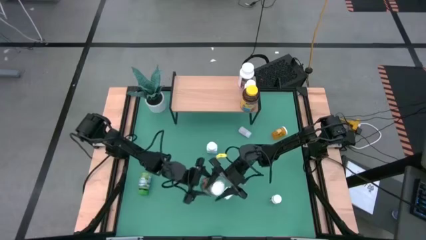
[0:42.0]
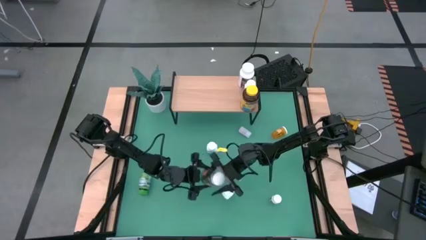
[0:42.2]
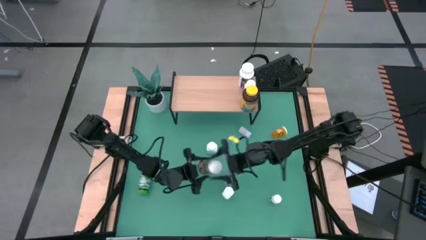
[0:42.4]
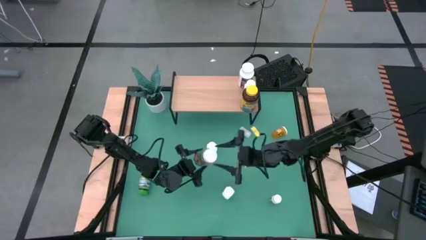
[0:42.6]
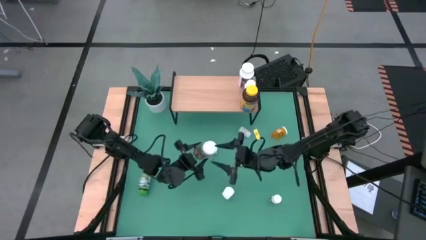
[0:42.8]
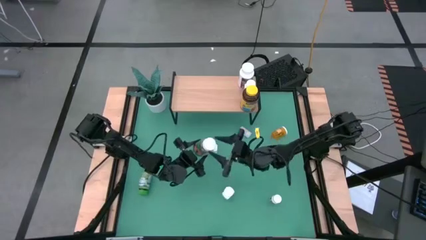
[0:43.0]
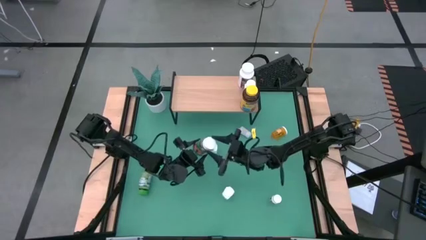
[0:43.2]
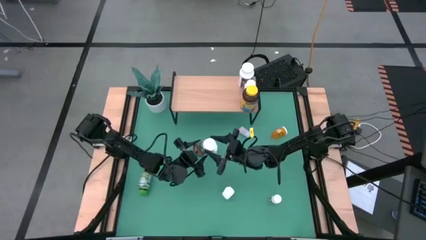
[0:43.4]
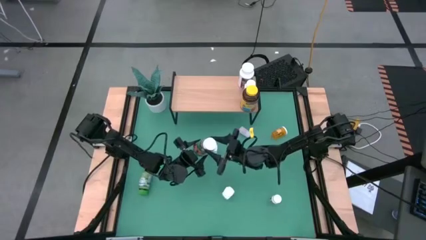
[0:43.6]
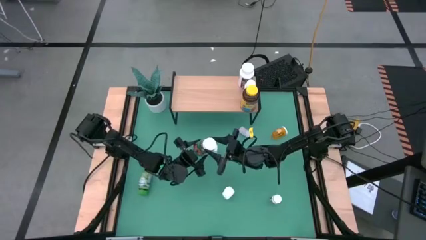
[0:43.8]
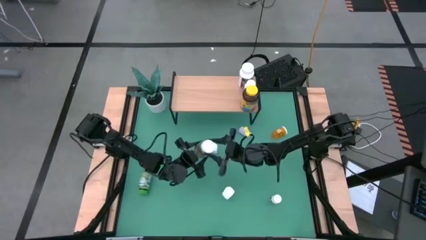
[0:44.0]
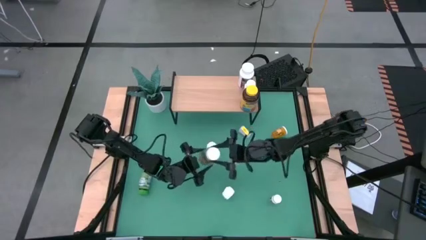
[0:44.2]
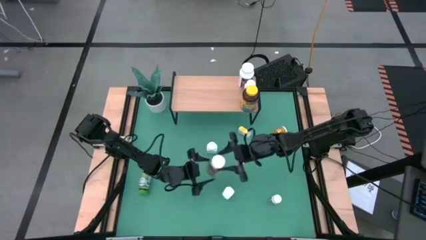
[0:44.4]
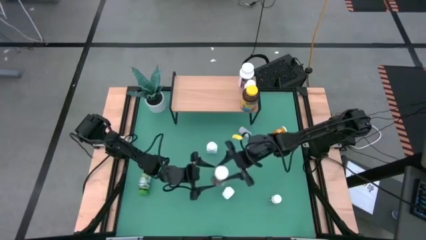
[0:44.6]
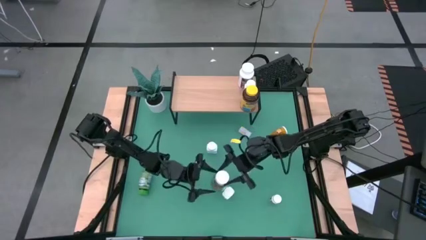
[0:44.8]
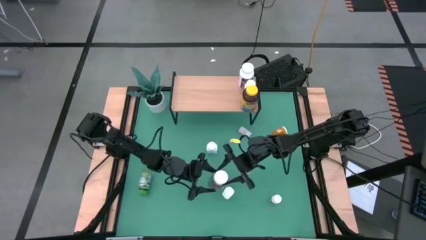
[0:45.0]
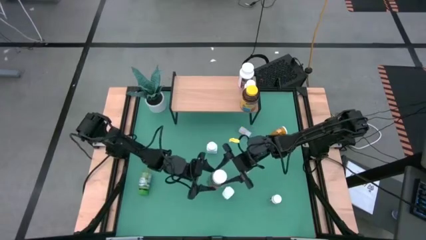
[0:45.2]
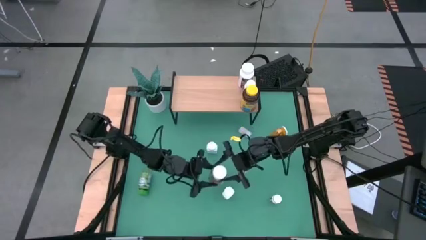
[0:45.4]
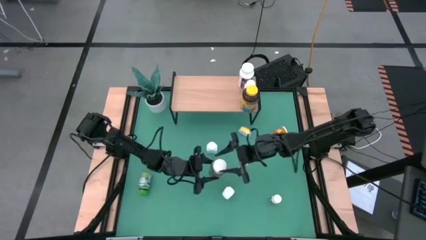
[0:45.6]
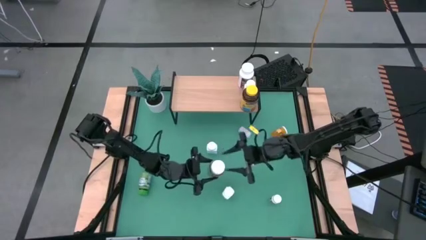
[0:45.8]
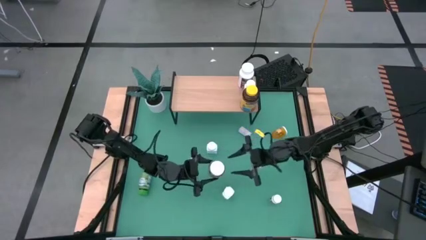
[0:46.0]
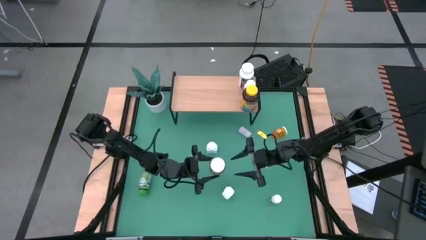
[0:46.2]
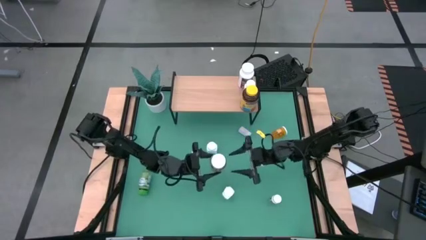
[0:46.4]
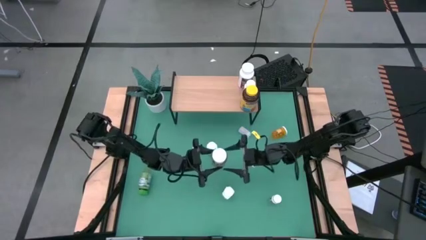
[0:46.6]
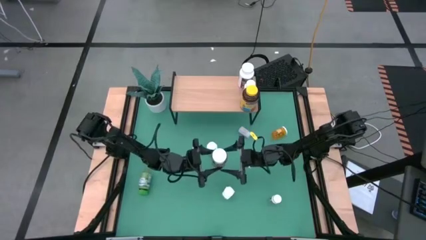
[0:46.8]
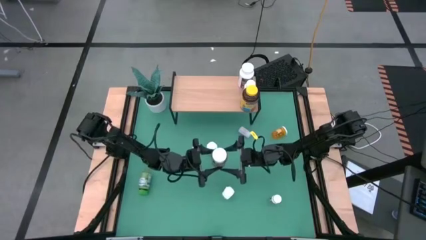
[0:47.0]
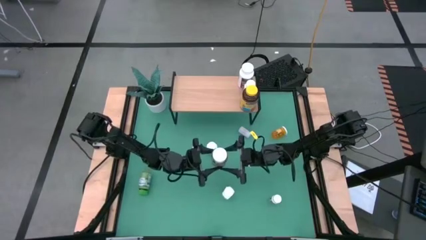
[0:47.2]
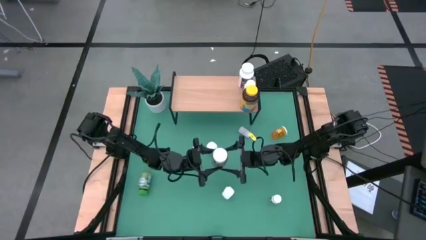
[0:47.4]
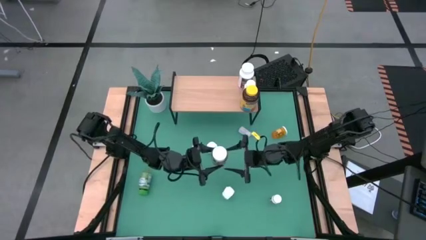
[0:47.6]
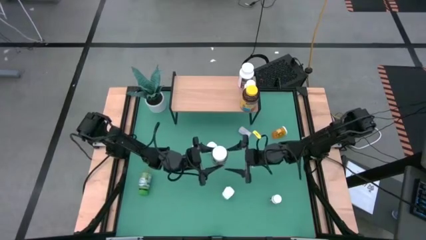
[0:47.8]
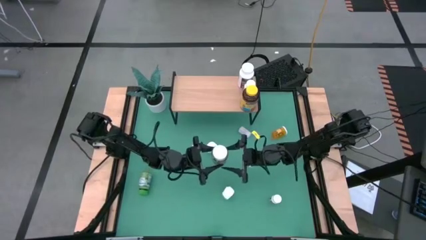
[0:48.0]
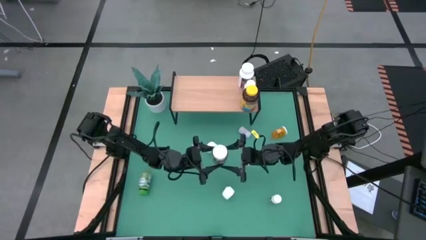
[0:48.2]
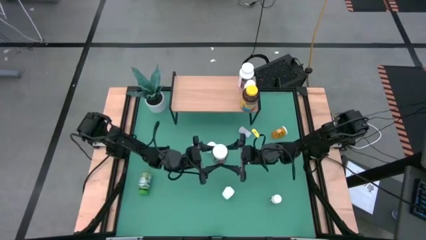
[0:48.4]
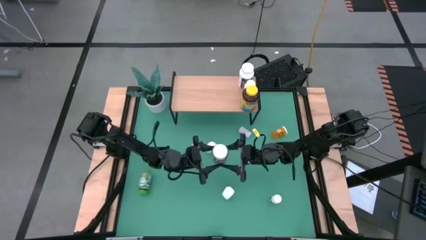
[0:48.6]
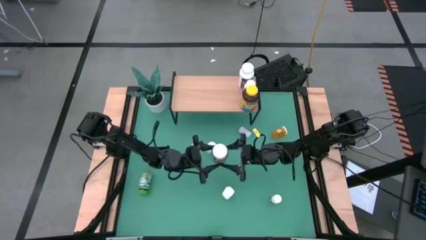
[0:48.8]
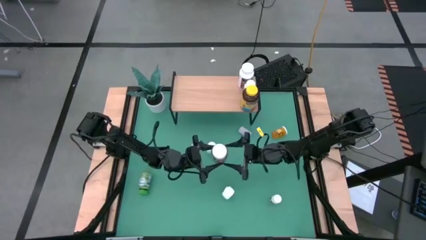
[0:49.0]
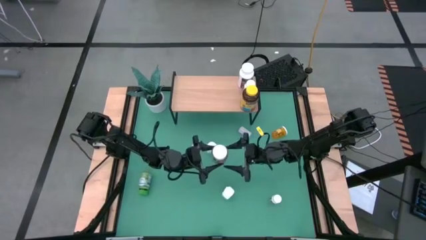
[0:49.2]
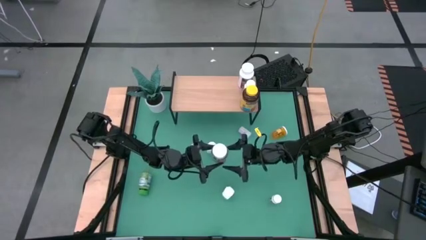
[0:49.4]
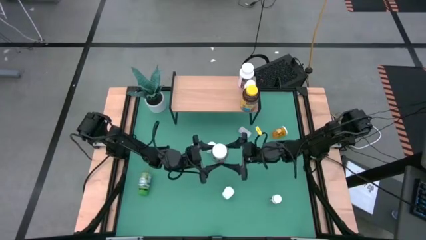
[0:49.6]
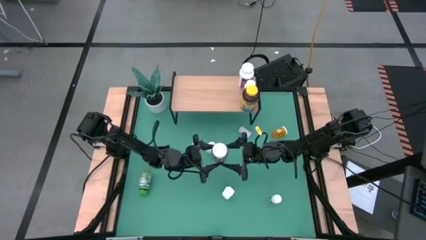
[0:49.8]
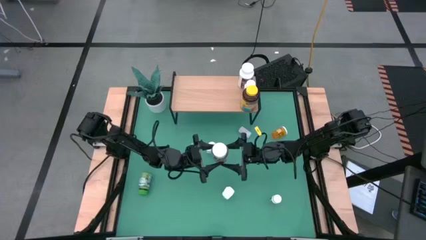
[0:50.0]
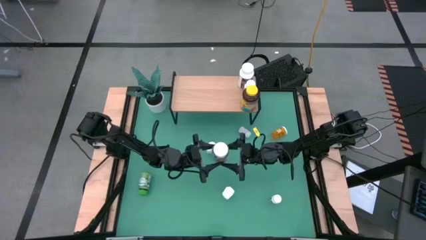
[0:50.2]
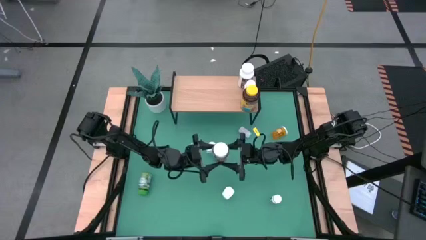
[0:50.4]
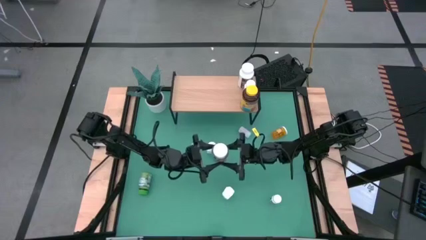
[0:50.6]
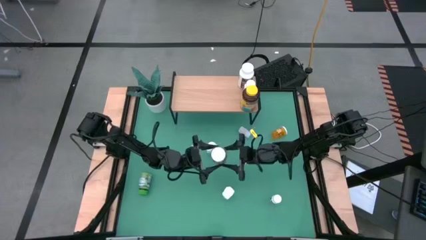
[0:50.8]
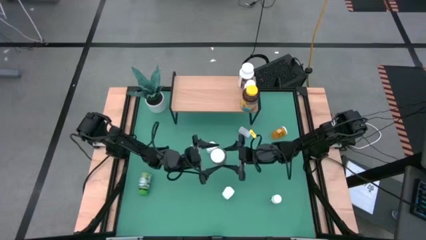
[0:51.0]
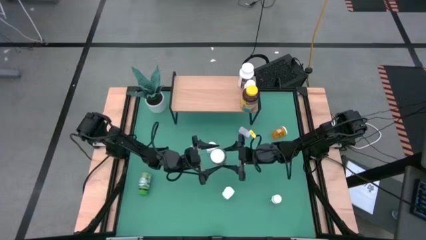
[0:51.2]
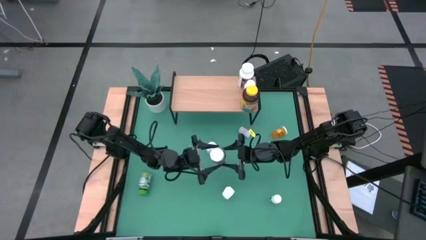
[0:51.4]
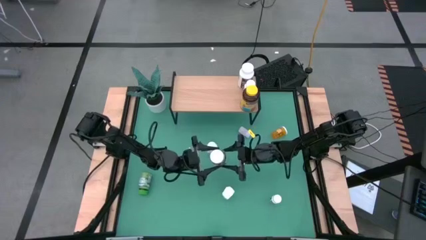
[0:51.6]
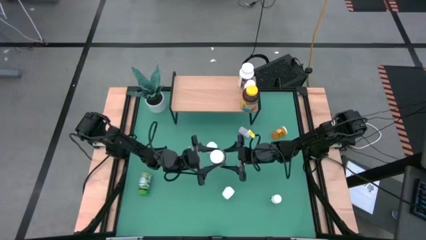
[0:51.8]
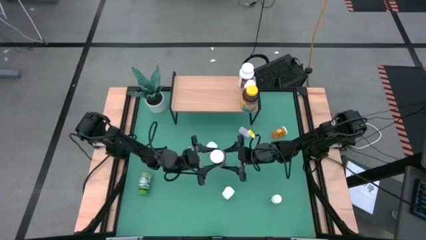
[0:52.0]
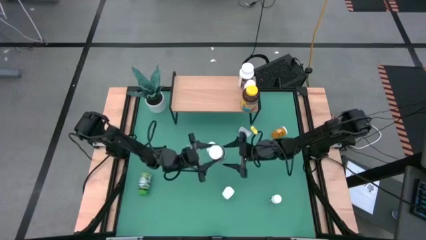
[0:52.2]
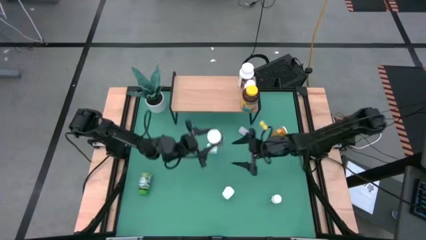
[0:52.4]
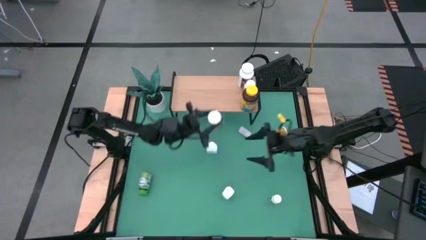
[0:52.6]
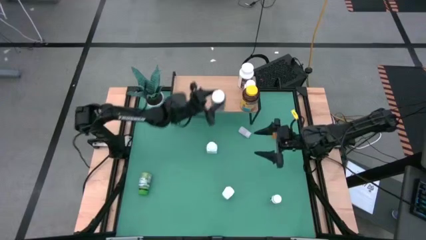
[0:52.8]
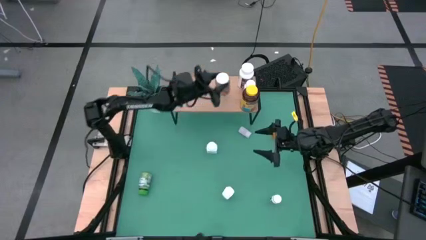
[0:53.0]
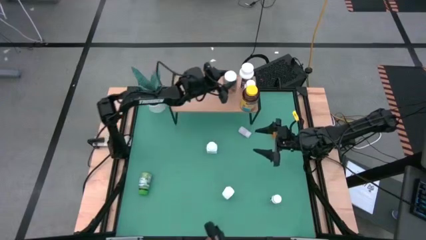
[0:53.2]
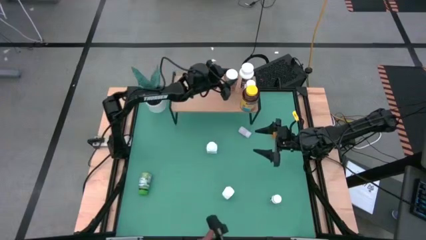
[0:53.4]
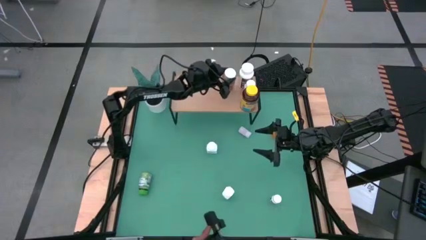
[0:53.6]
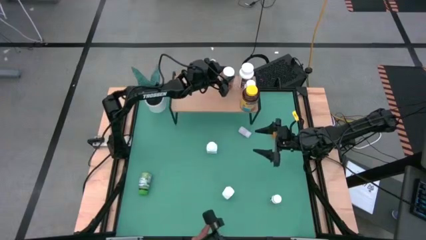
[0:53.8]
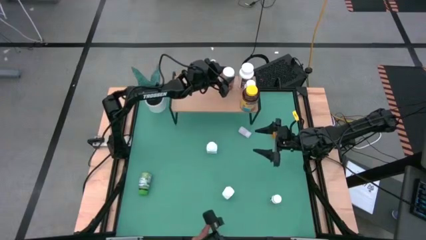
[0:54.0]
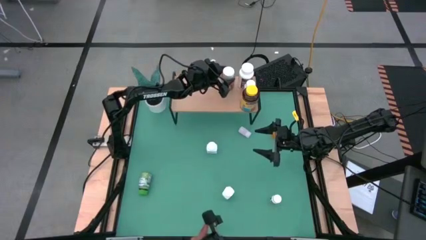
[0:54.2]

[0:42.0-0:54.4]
Task: Pick and place medicine bottles onto shelf by color
Put the green white medicine bottle on the shelf

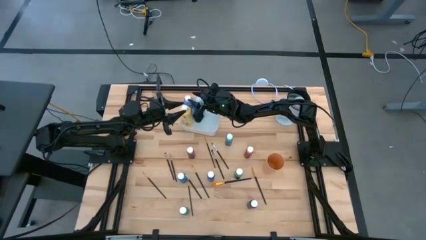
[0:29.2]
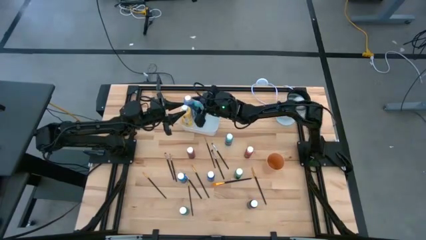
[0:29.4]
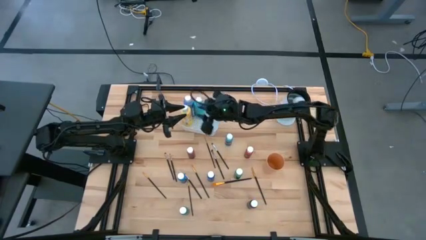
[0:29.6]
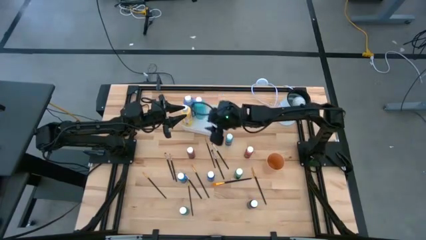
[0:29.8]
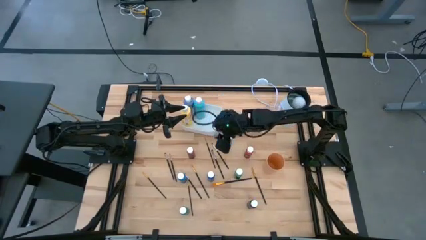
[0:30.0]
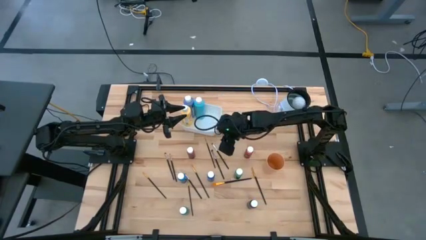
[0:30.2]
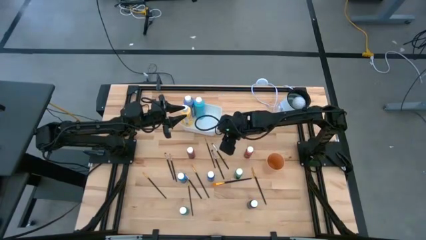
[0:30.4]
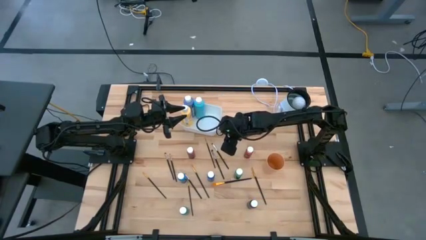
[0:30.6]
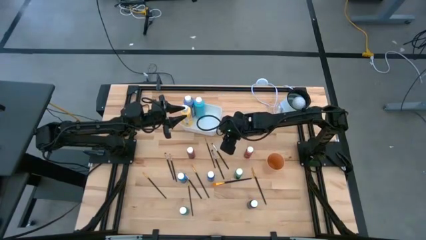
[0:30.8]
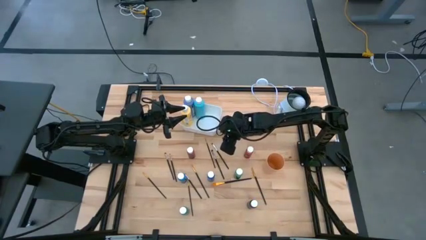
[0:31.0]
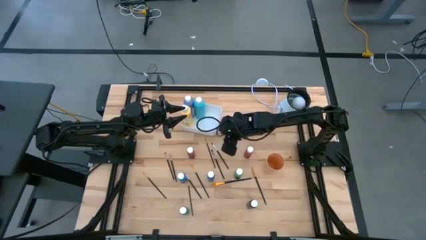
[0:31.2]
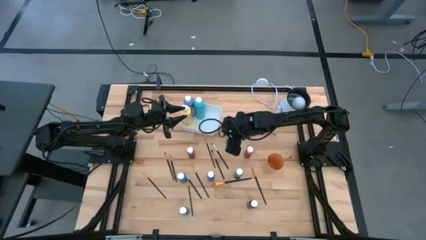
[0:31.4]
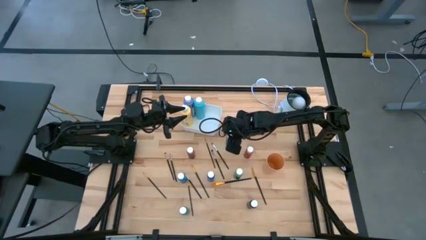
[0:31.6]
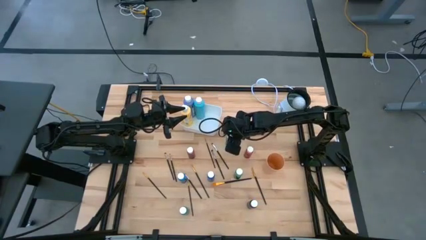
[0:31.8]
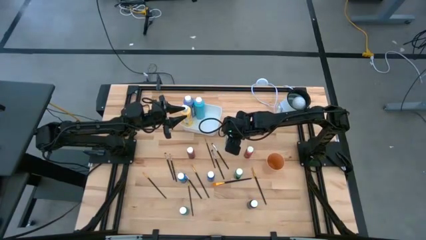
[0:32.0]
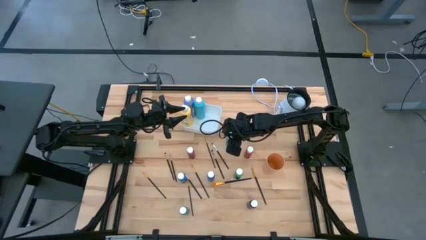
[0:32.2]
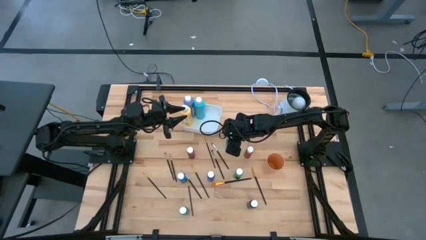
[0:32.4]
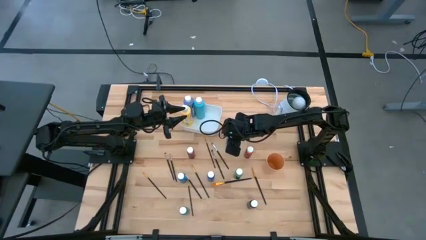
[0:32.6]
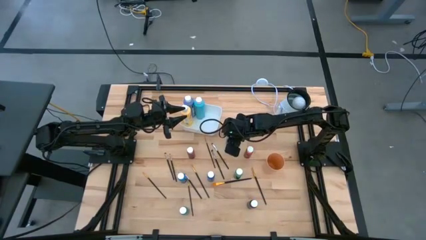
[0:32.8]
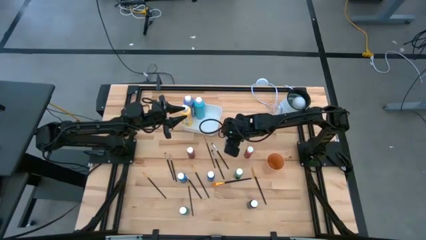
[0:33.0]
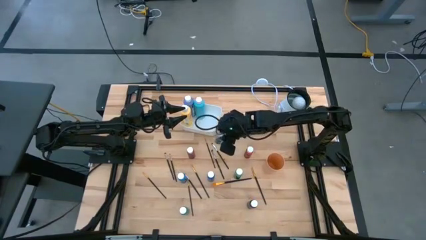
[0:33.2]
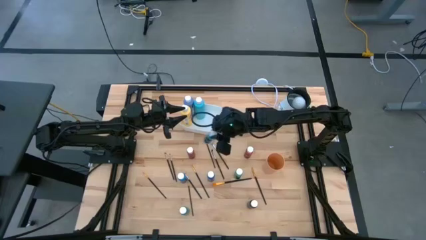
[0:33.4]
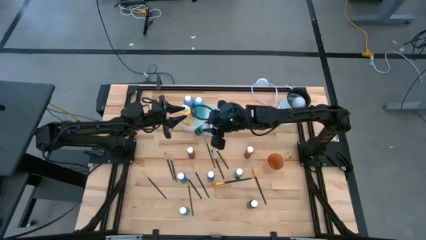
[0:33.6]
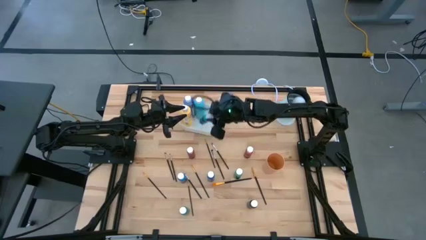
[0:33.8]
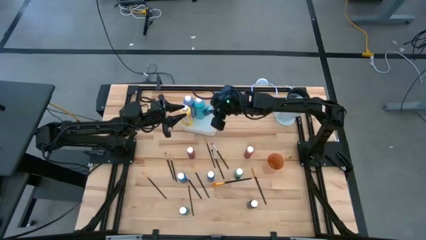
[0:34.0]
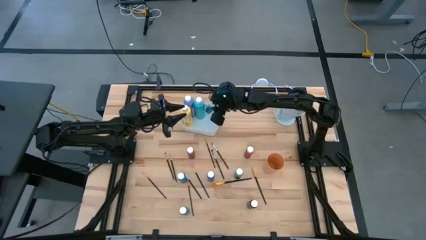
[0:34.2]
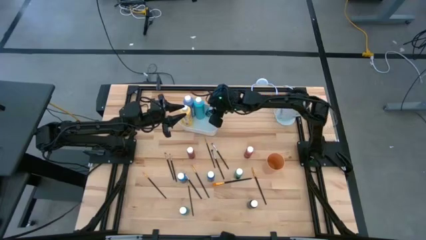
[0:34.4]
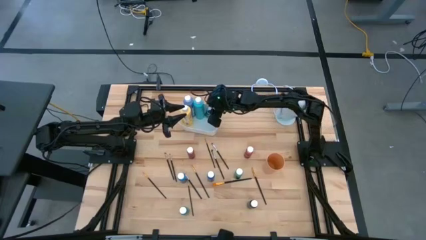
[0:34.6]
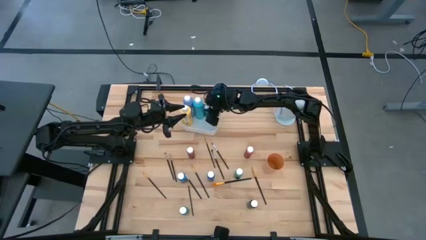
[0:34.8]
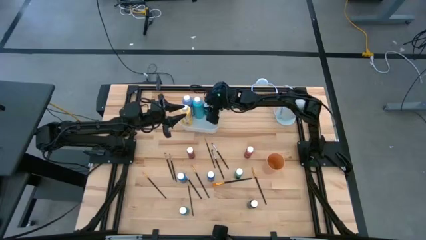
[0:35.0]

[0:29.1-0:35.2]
Task: Pick & Place Paint Supplies
Put the small light blue paint bottle into the white bin
